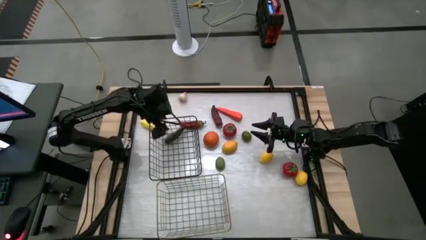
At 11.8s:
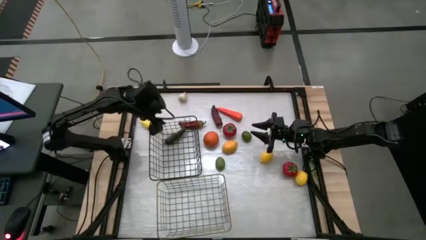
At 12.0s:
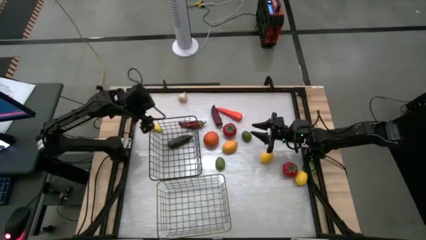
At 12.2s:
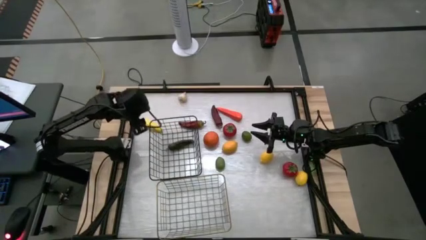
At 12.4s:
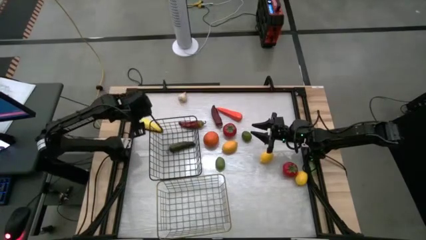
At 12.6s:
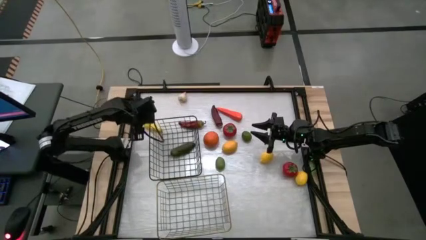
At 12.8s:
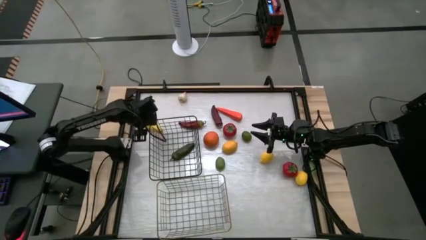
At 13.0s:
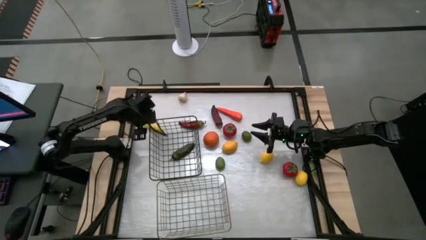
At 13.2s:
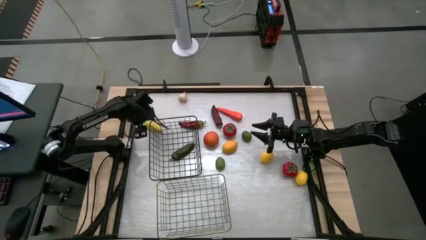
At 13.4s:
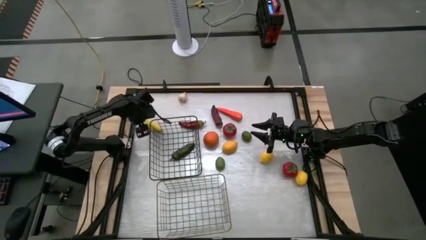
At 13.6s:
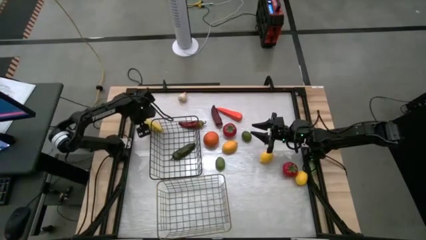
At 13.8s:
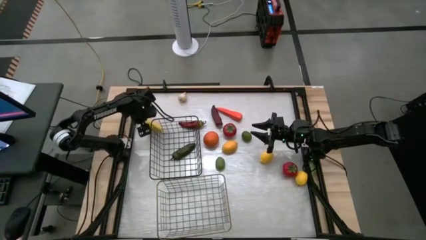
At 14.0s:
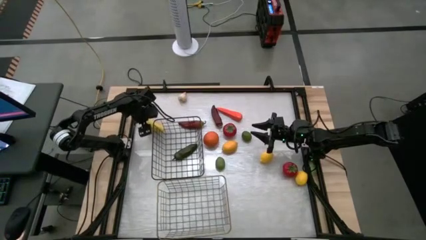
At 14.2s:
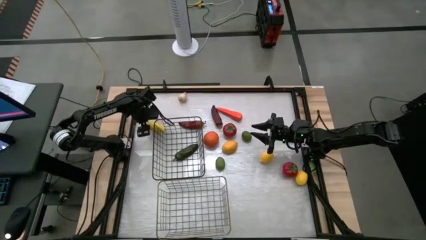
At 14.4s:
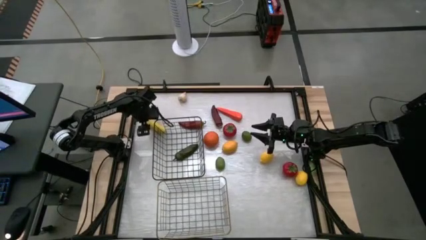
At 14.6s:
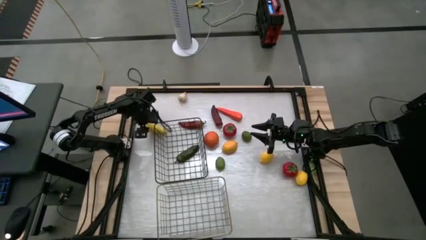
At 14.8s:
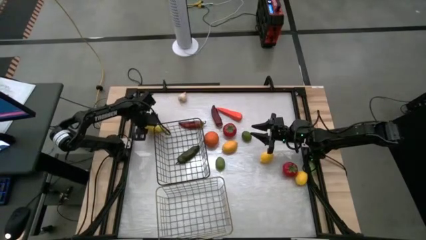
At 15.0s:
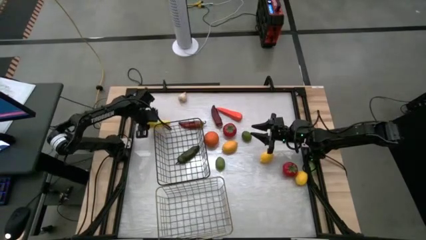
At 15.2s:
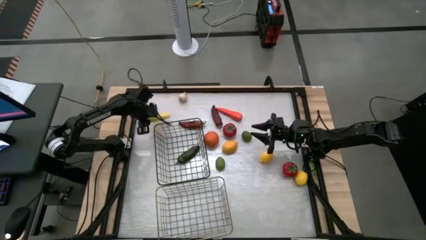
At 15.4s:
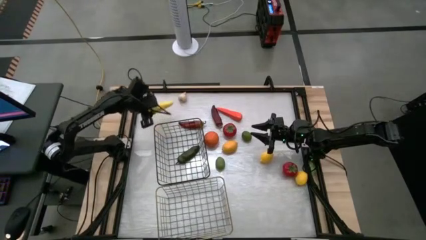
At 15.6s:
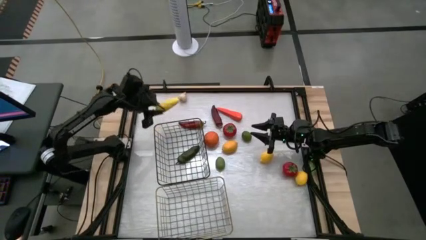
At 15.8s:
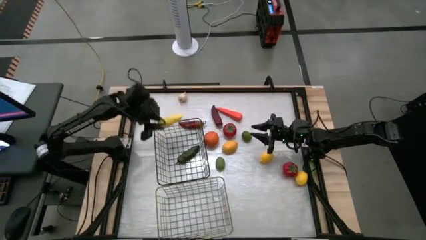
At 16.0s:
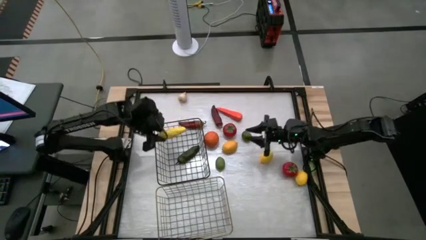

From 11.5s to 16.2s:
Task: Sort produce into baskets
Put the yellow corn into the black wire basket

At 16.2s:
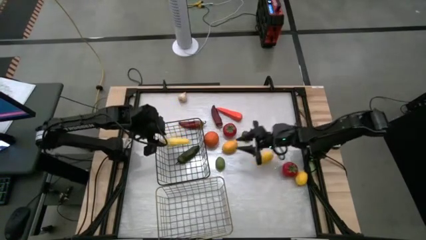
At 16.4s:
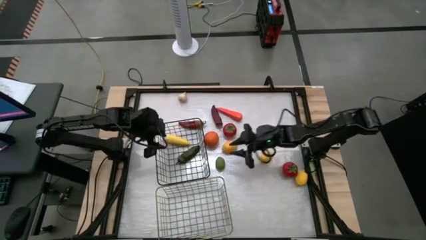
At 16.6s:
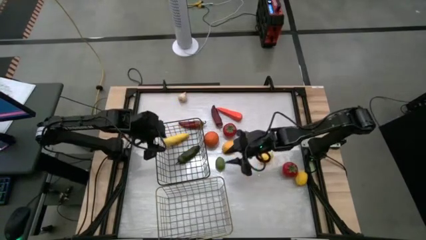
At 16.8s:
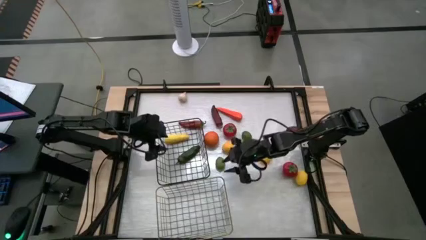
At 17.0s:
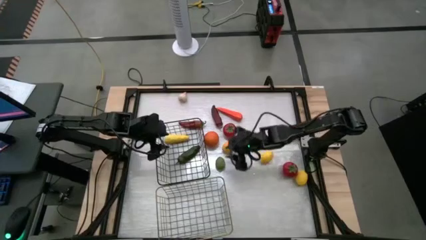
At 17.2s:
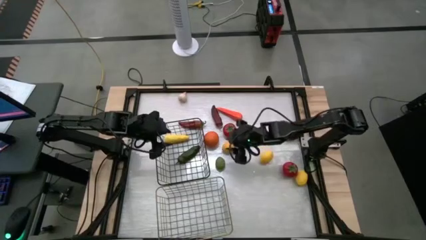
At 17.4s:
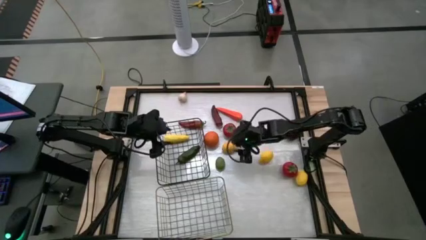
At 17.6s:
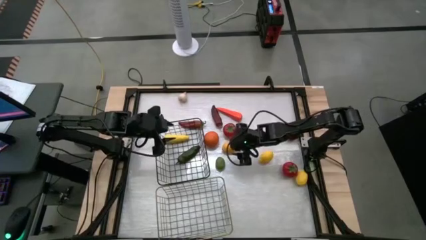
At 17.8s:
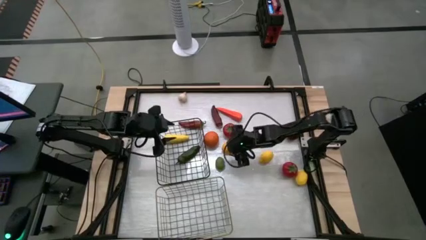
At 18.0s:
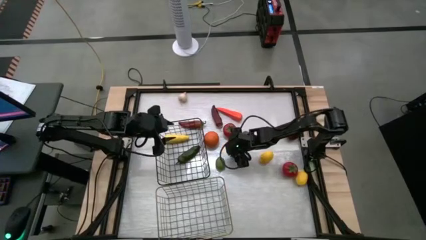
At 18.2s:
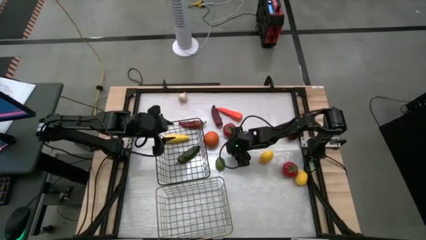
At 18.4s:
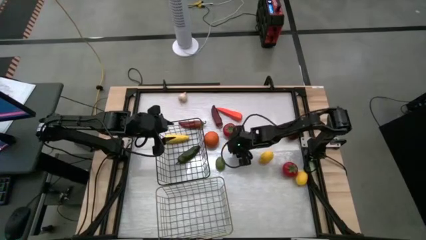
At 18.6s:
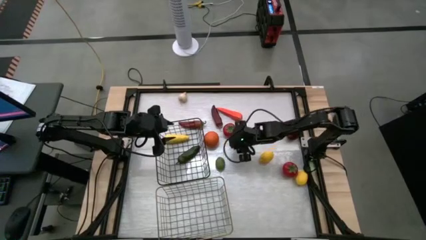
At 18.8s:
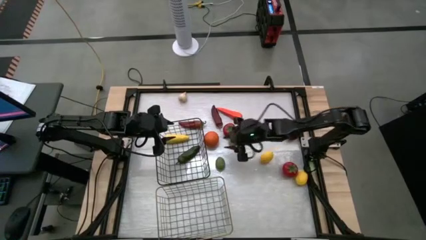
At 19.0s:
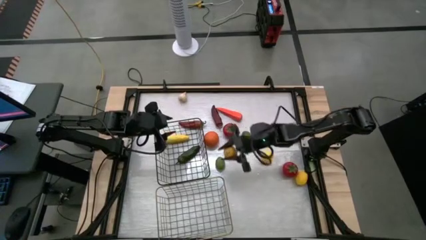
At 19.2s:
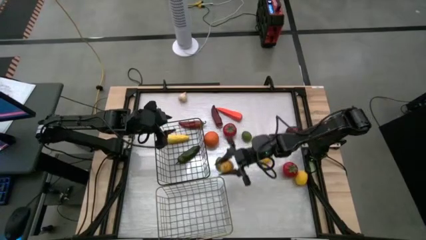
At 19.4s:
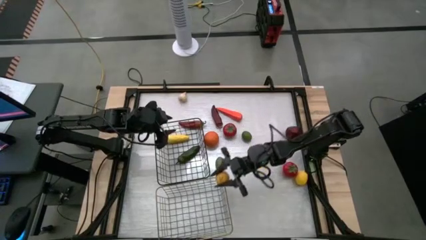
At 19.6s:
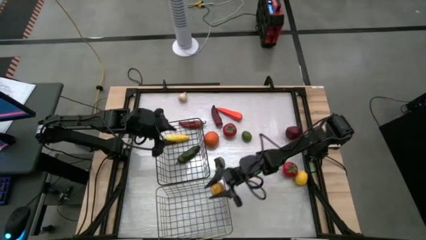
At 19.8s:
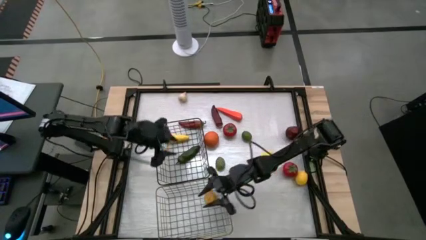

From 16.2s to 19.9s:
Put the left yellow lemon into the gold wire basket

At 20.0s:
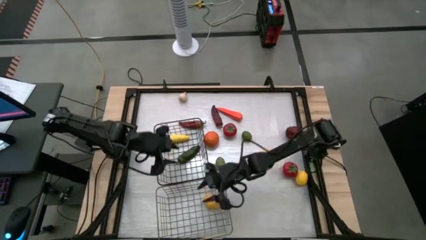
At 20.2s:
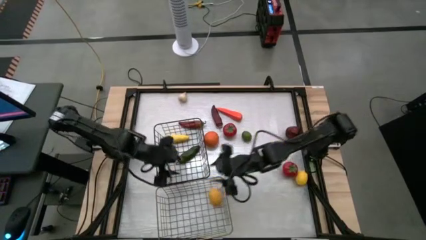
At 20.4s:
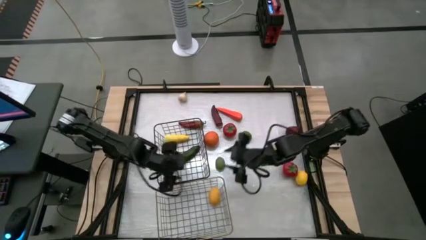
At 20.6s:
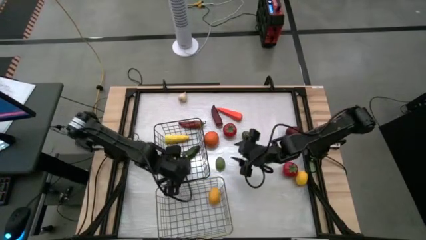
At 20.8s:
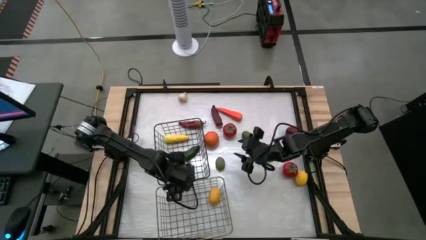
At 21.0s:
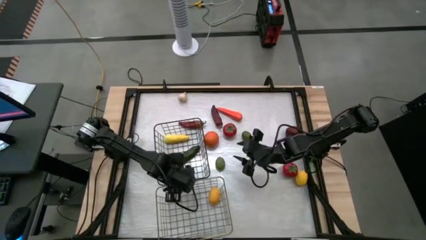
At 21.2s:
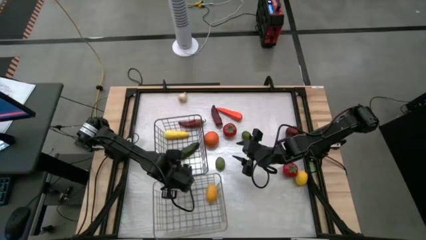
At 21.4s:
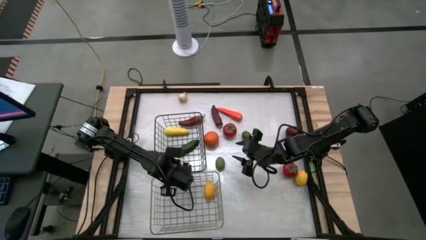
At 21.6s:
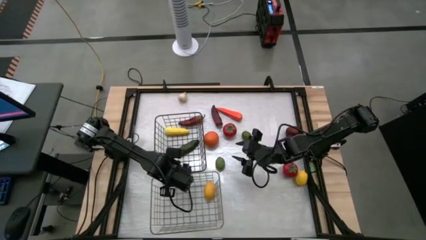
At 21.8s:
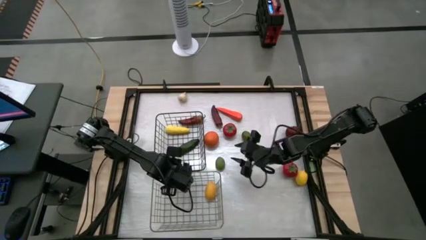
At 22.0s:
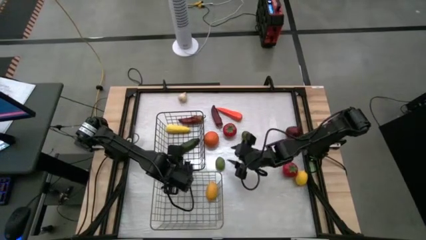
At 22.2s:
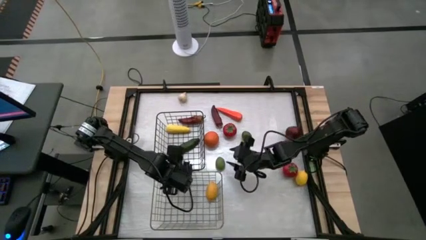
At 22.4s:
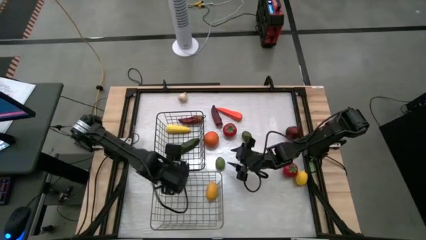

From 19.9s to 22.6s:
Adjust the wire baskets on the table

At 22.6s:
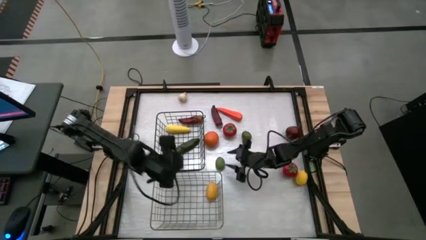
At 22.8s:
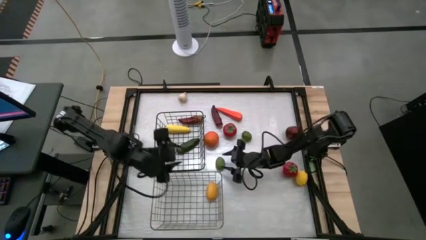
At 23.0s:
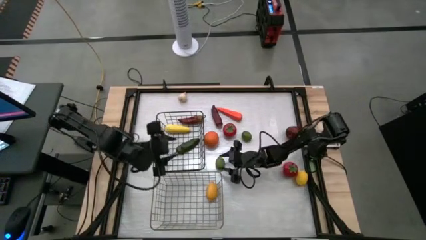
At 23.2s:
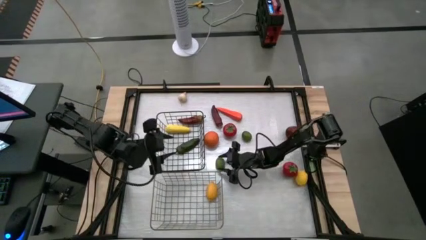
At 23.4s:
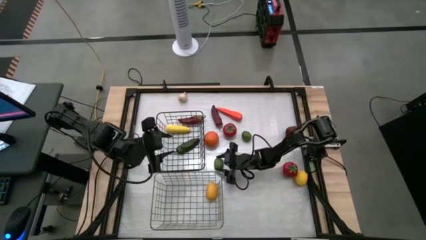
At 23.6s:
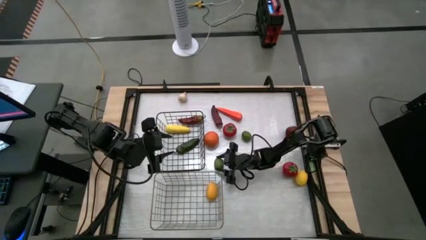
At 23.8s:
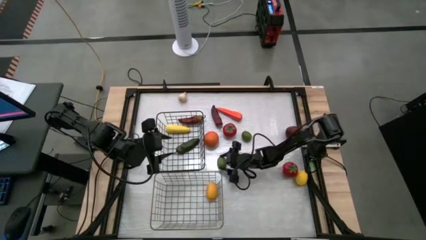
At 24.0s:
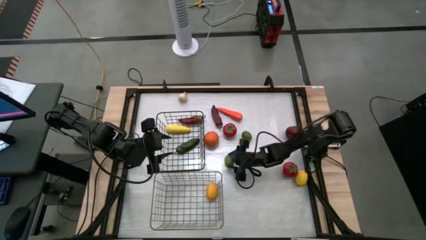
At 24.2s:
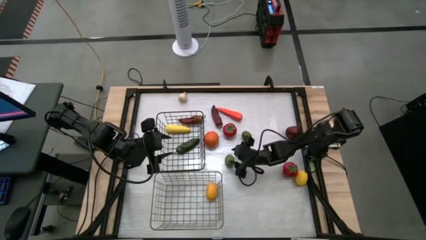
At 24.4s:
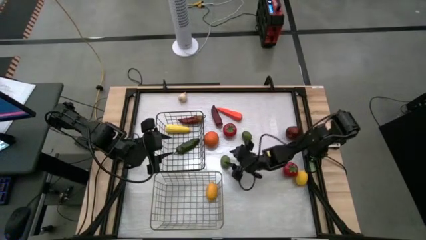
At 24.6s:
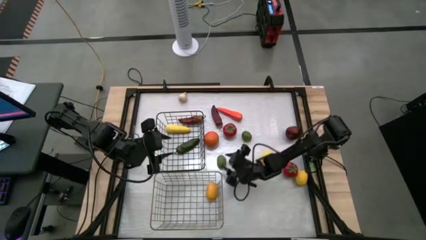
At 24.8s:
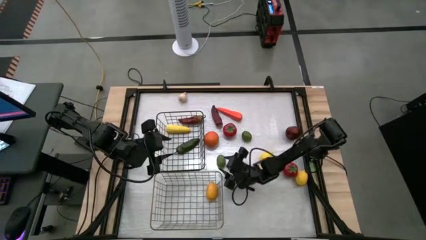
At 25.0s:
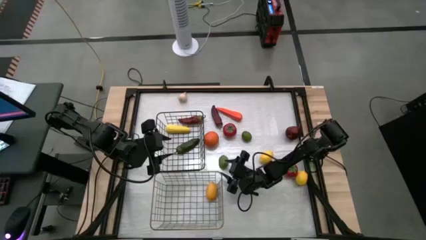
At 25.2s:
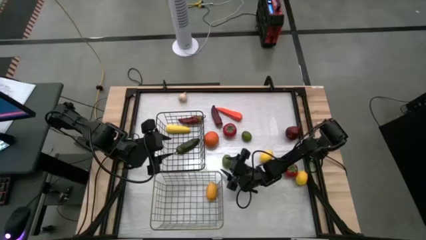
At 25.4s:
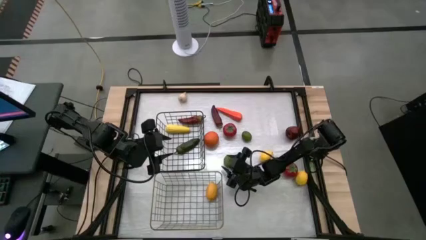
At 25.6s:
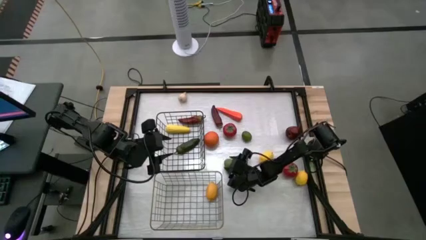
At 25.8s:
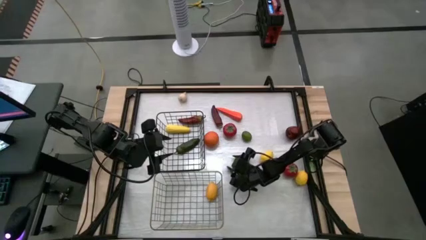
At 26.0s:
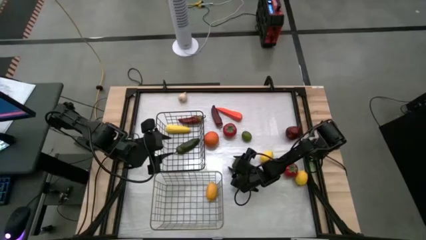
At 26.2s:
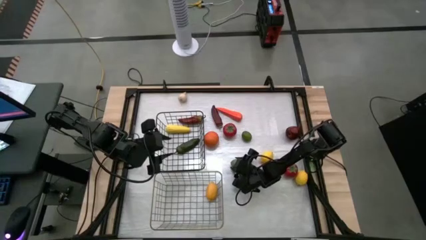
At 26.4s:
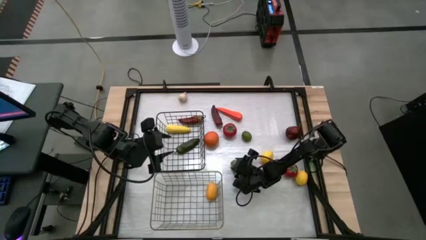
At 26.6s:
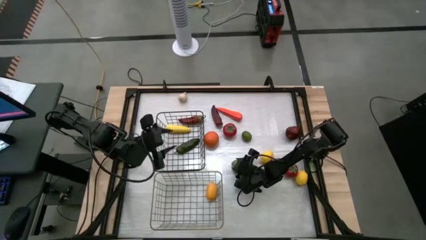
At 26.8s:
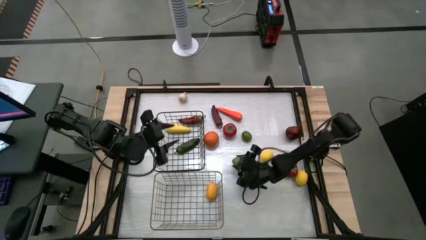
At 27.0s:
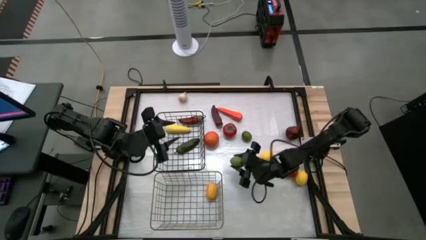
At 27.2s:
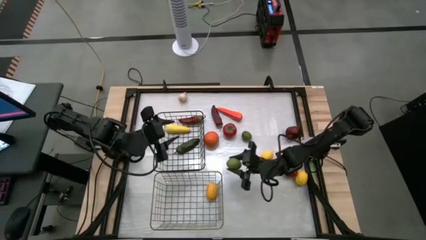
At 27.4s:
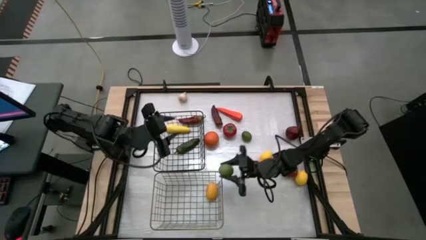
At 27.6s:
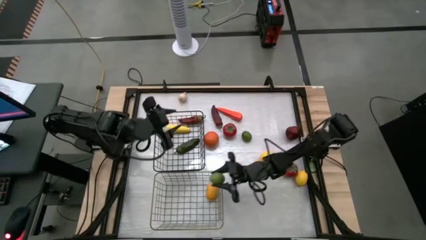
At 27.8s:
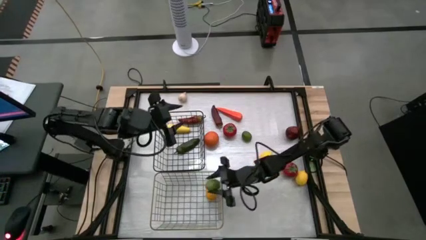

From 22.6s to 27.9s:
Put the bottom green lemon into the gold wire basket
